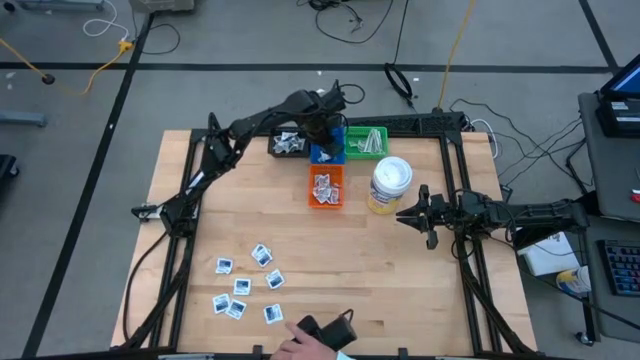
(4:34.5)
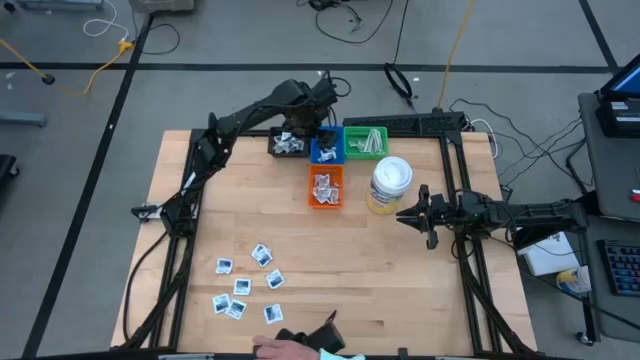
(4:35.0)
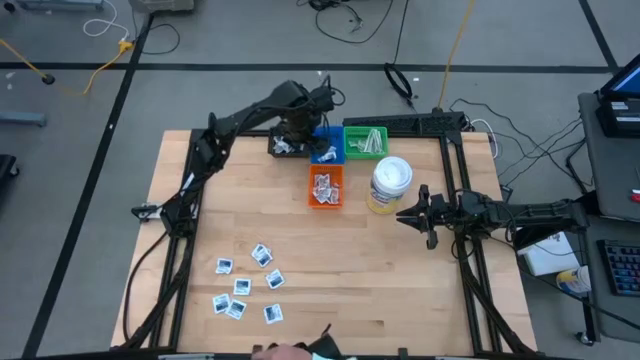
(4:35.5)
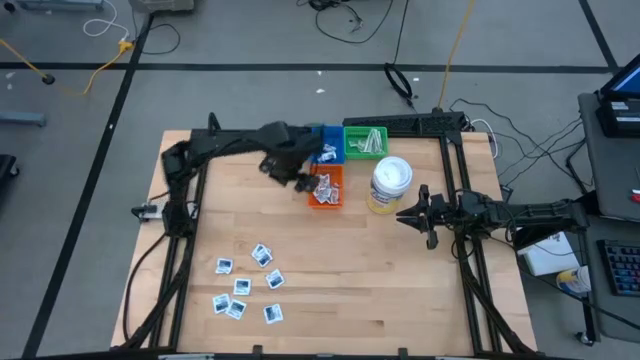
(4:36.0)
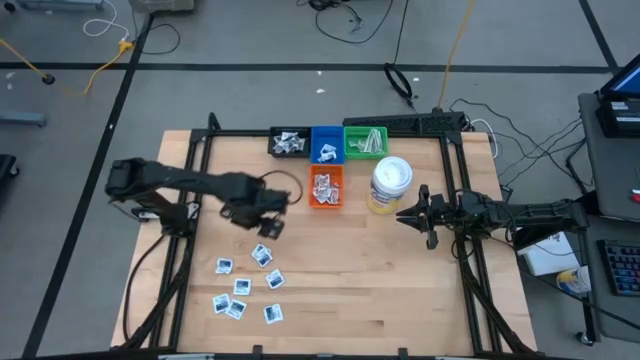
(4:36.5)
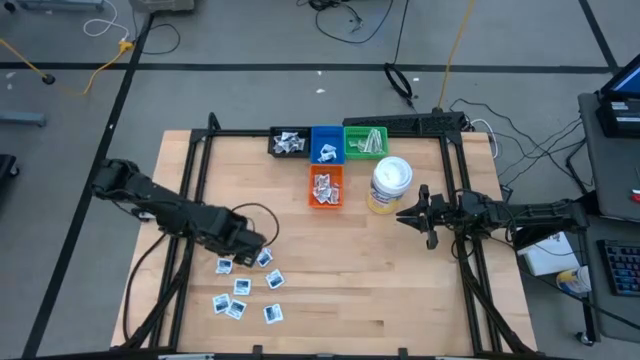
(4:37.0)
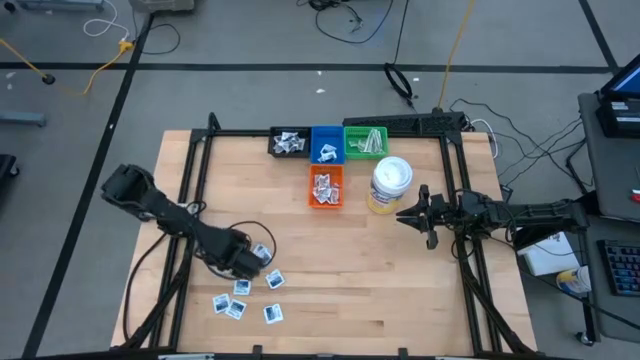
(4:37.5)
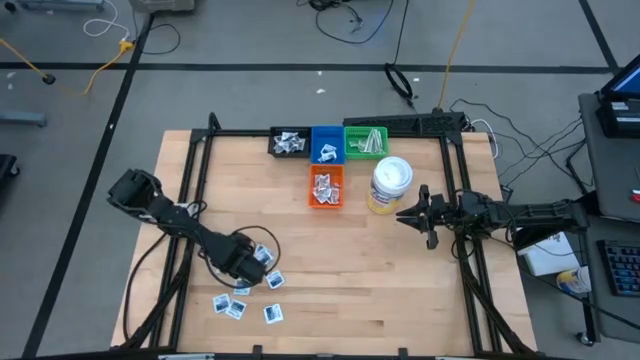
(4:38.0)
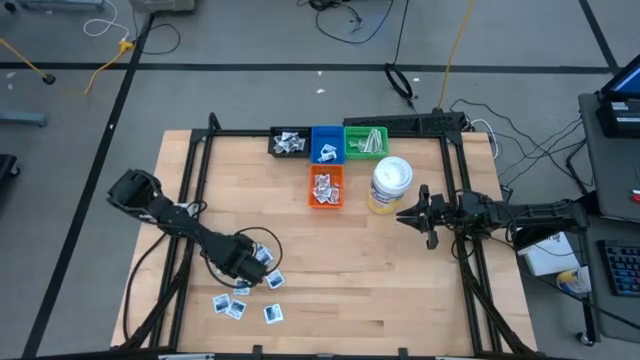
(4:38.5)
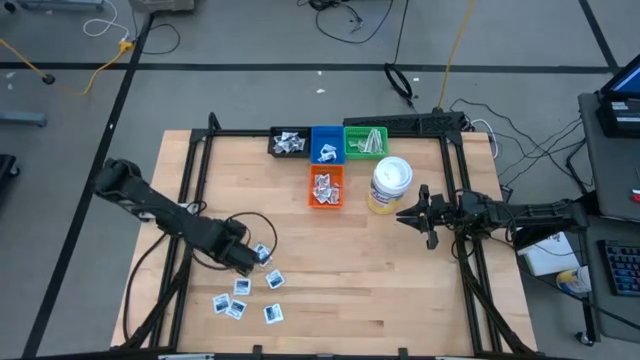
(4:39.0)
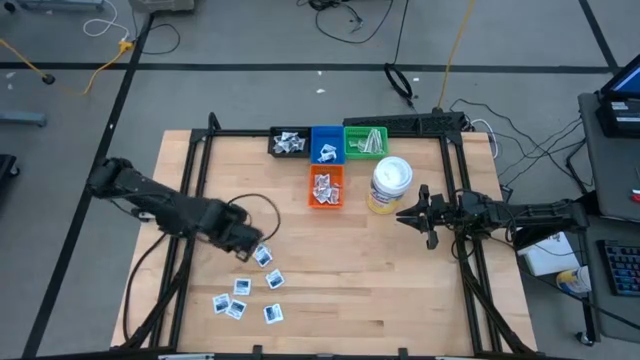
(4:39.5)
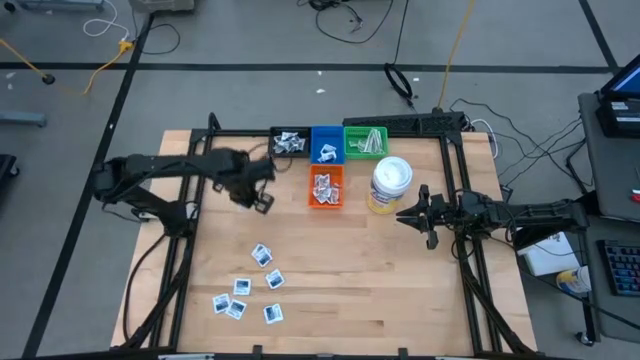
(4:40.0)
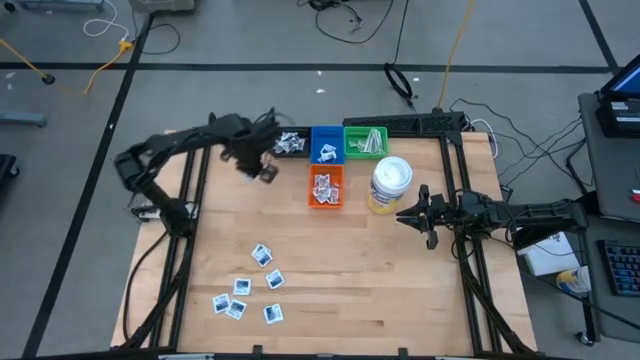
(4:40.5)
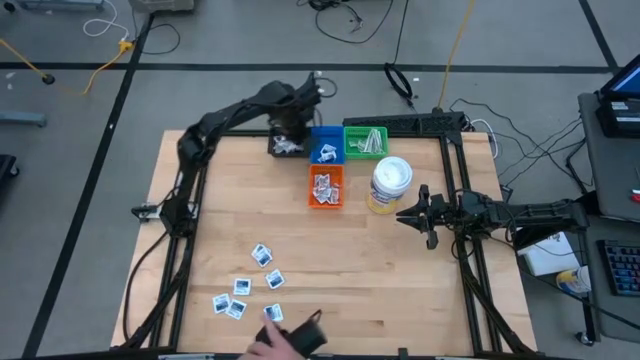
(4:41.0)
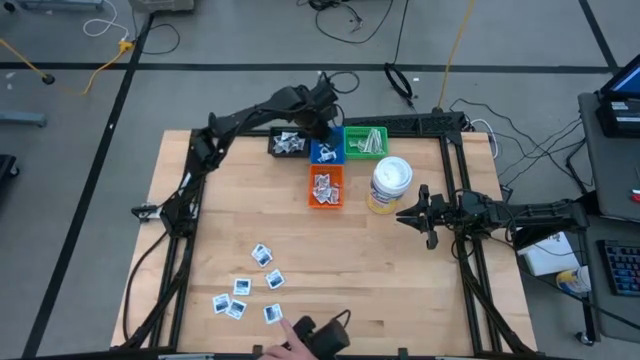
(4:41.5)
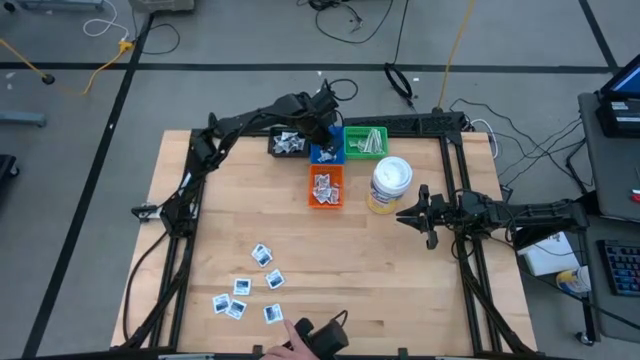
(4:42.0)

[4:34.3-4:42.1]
Task: Pick & Place First Aid Supplies
Put the blue alcohol pad into the blue bin

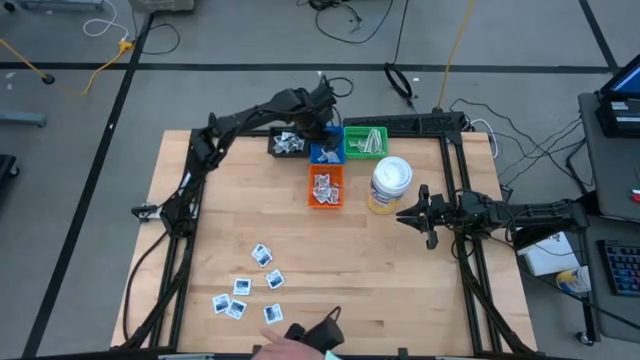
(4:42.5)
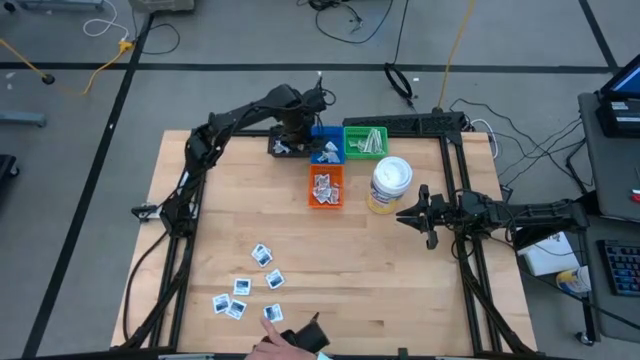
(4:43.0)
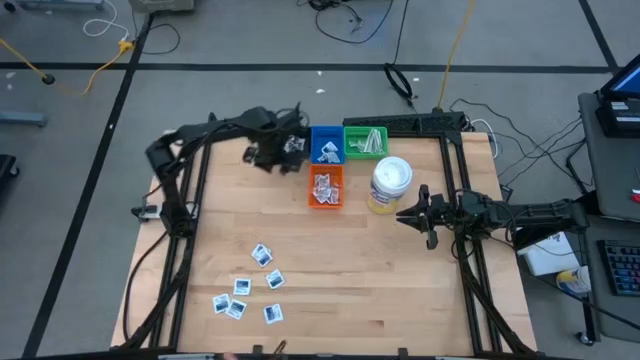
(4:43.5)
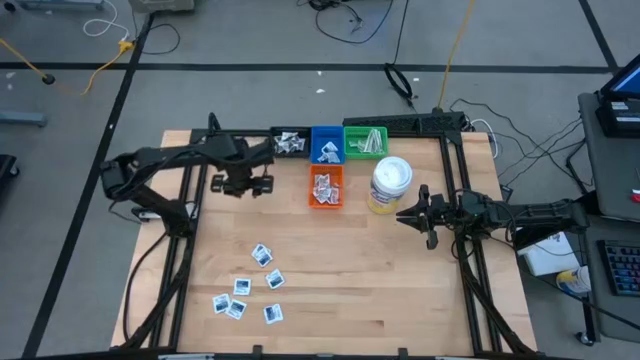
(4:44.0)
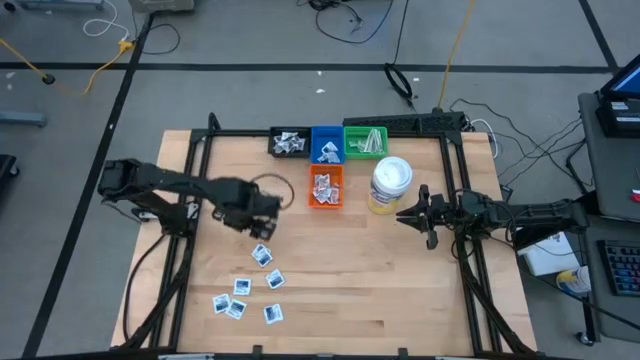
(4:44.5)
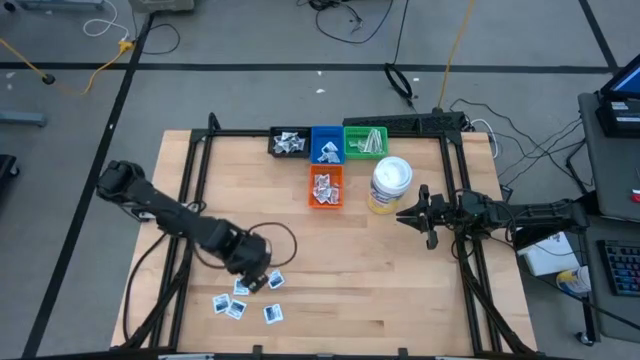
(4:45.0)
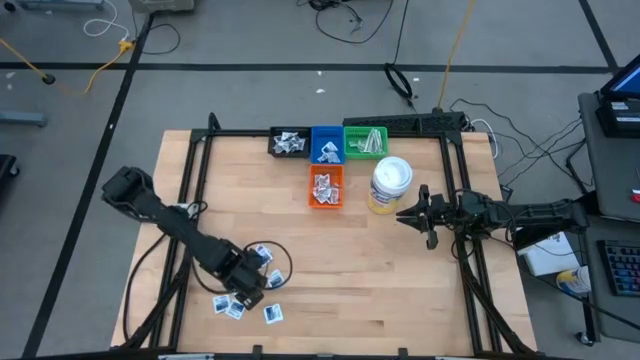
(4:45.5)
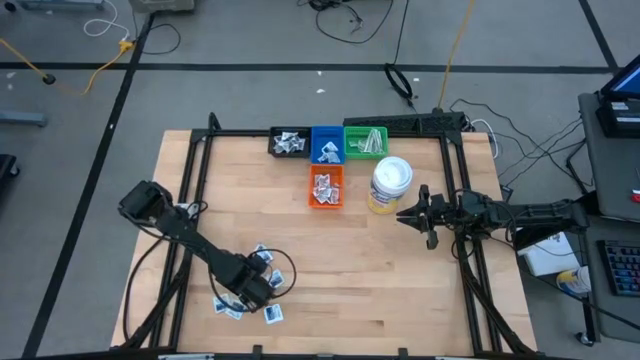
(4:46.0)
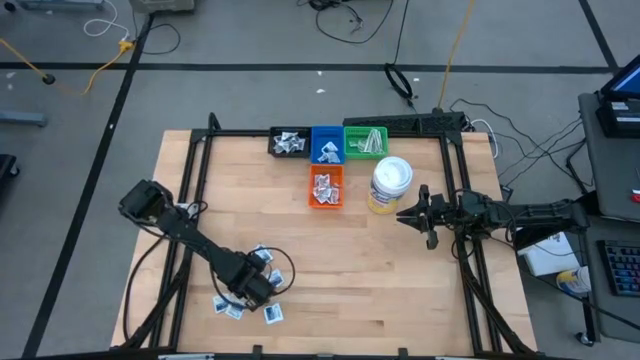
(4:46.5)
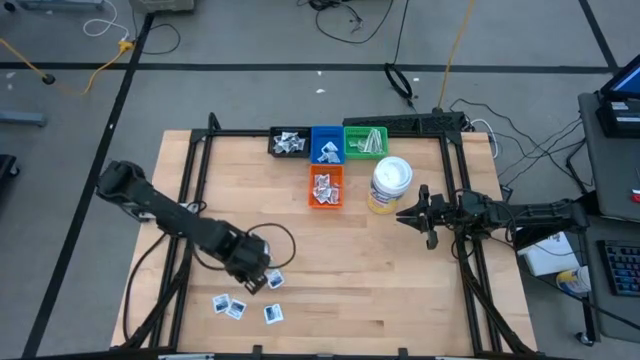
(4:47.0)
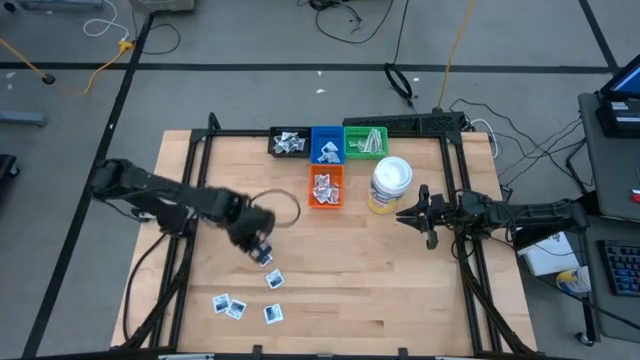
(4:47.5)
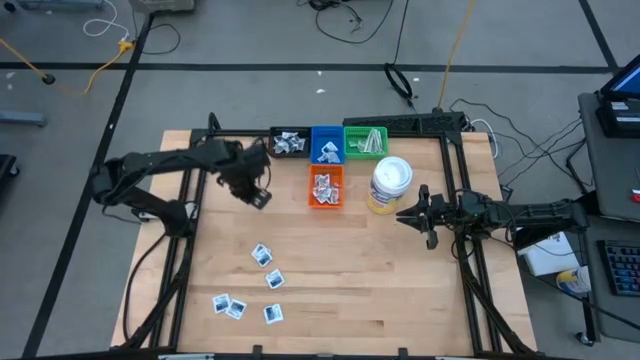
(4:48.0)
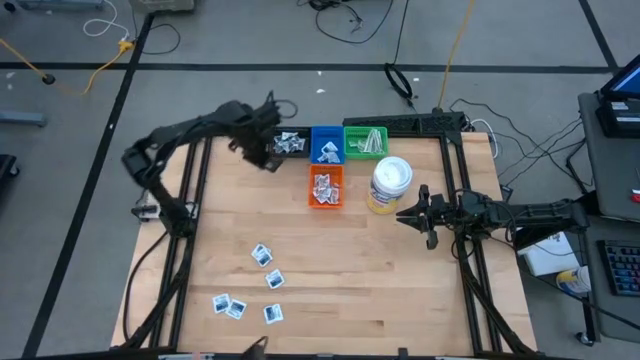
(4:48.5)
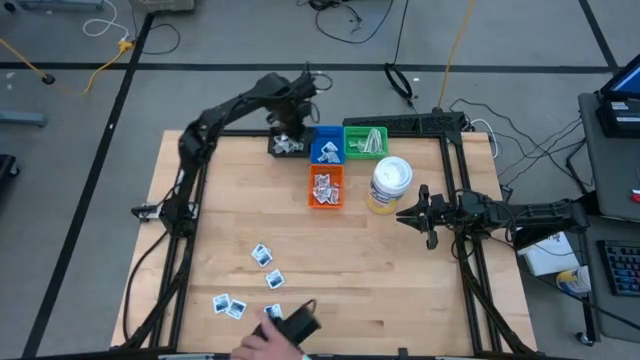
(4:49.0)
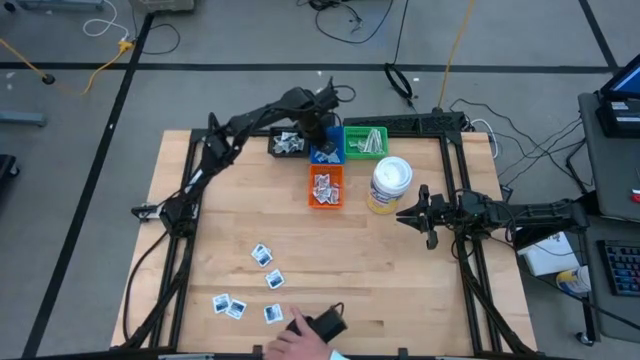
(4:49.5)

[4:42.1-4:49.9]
Put the blue alcohol pad into the blue bin

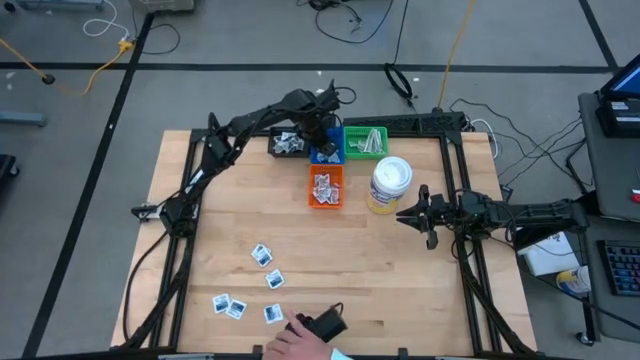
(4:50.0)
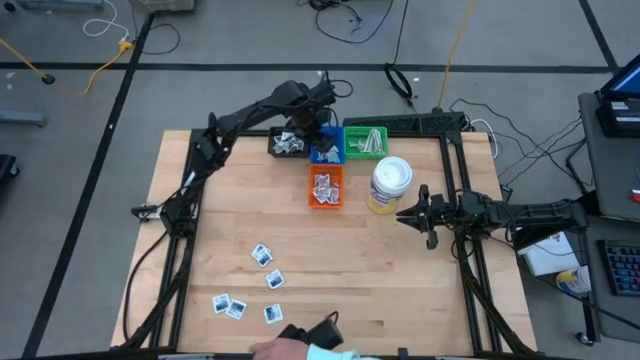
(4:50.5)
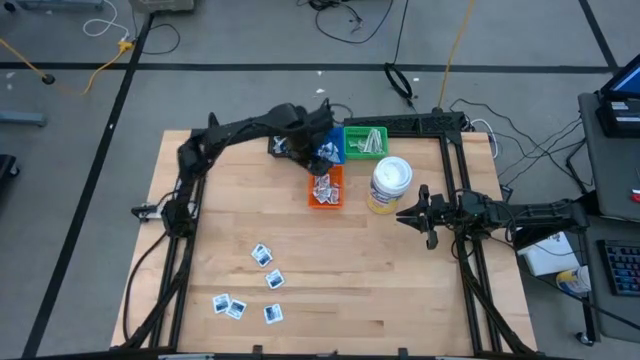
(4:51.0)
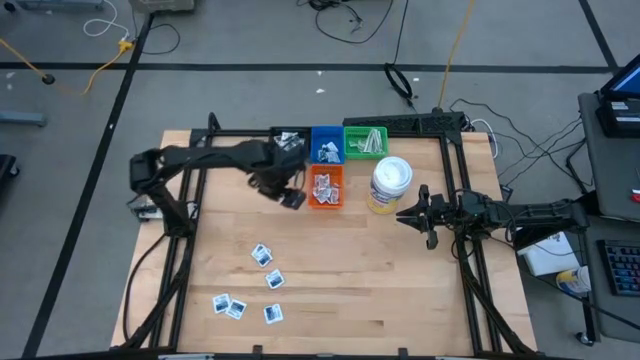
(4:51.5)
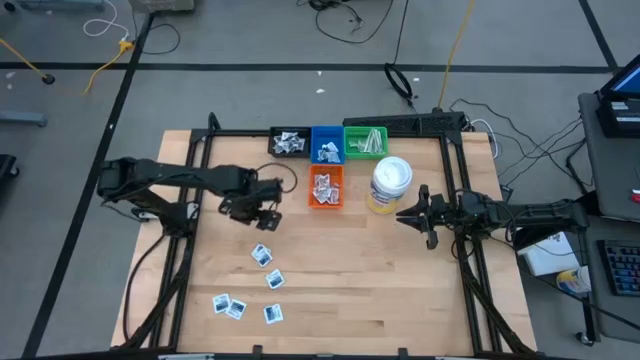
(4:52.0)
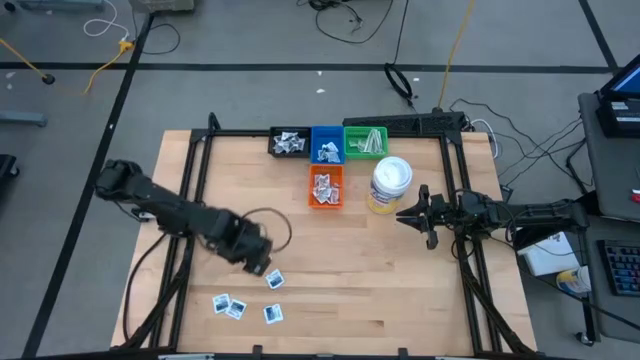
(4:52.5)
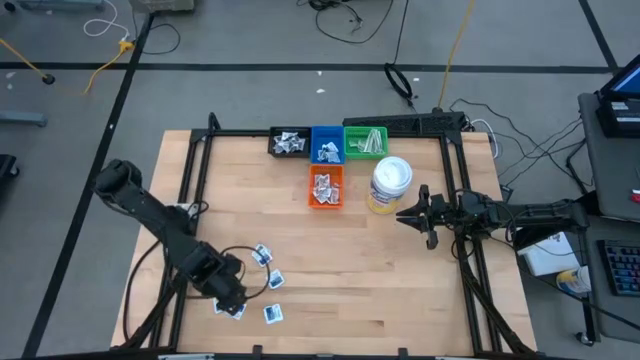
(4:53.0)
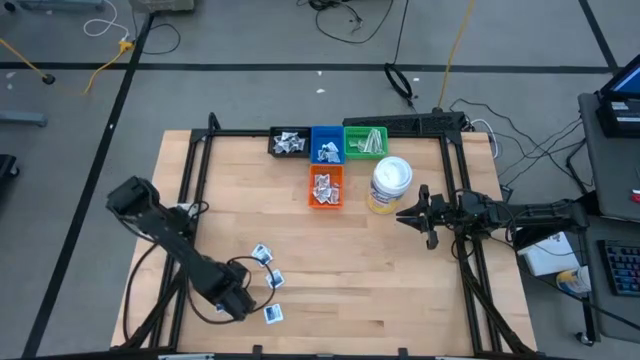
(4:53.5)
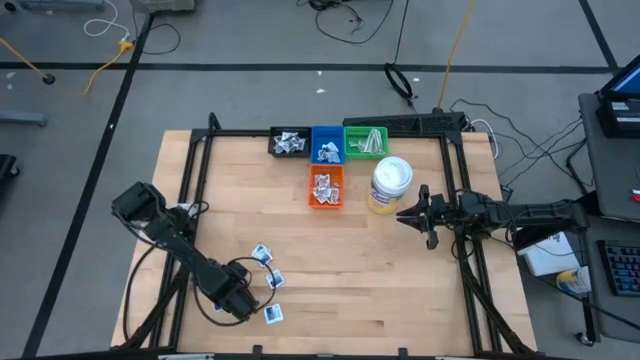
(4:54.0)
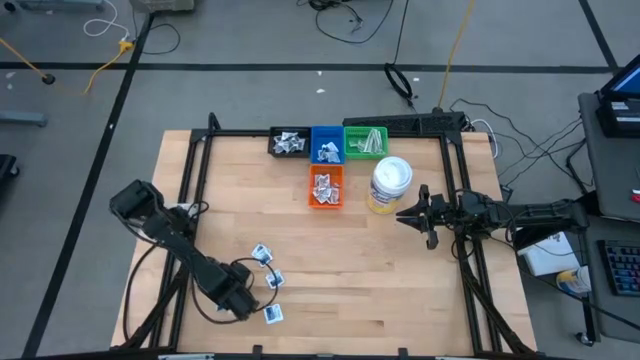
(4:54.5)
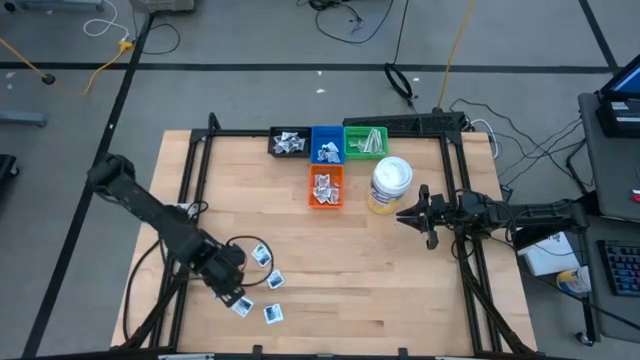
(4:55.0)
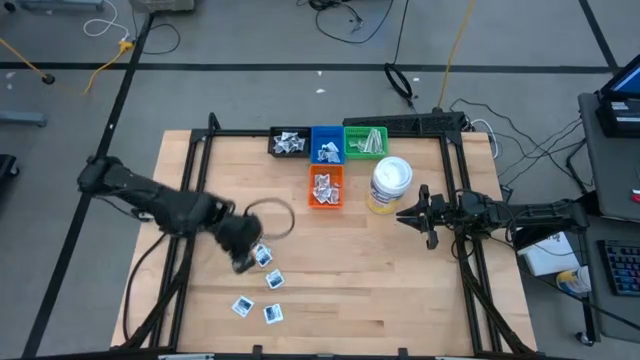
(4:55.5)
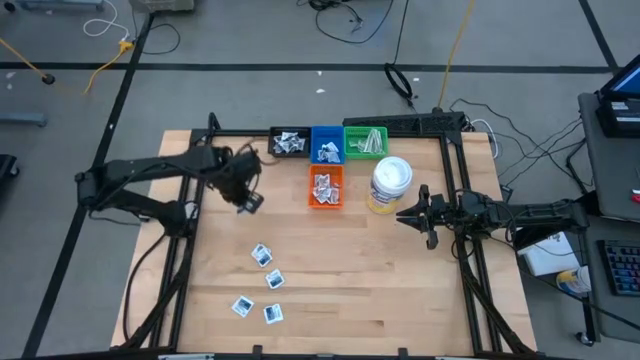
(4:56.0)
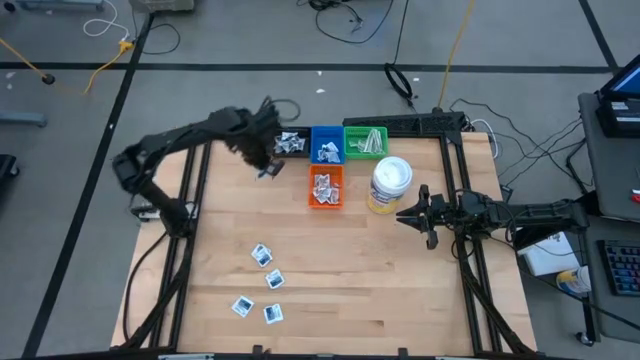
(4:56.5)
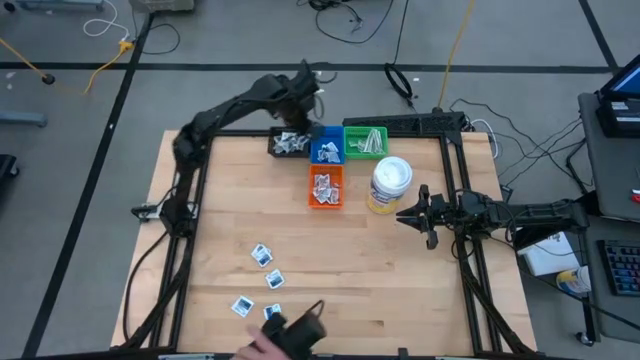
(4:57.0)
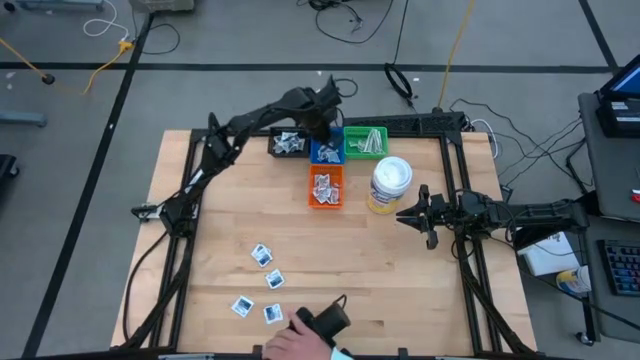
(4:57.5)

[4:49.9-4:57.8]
Put the blue alcohol pad into the blue bin
